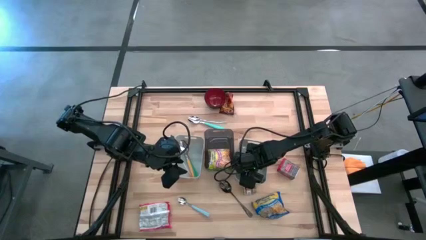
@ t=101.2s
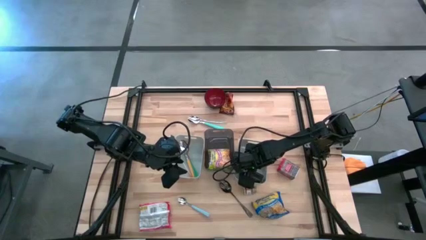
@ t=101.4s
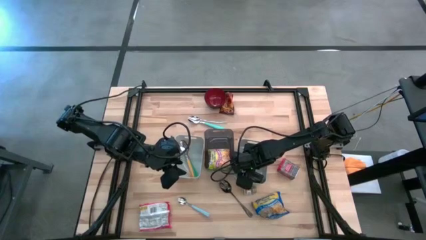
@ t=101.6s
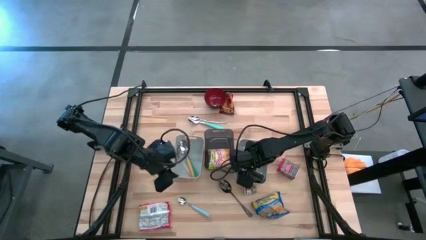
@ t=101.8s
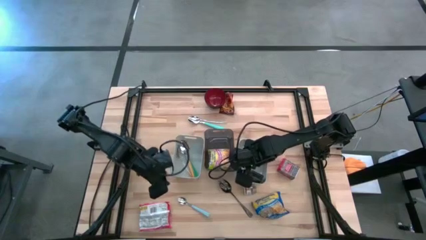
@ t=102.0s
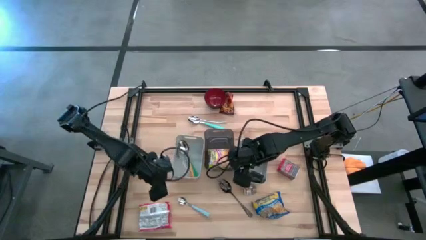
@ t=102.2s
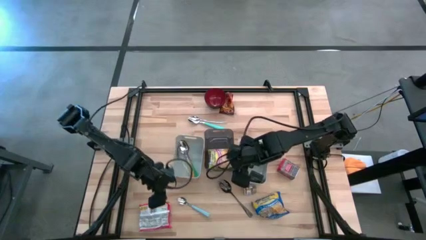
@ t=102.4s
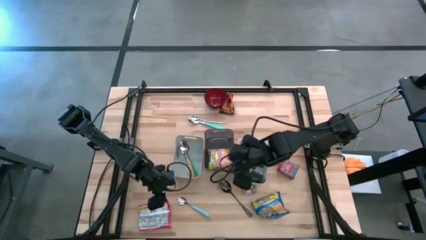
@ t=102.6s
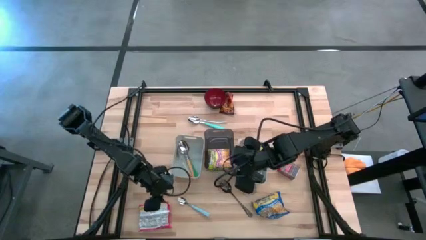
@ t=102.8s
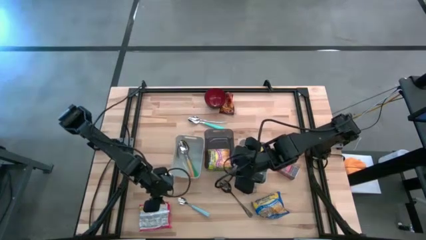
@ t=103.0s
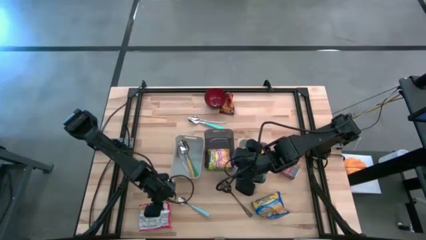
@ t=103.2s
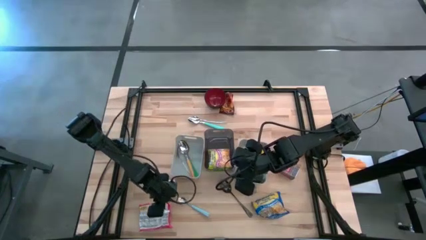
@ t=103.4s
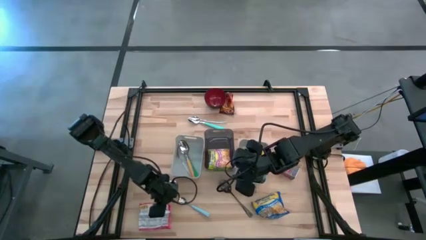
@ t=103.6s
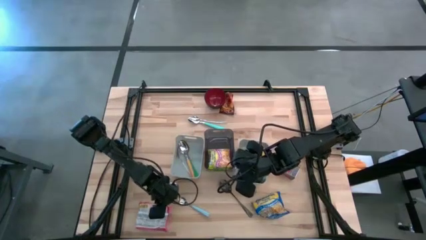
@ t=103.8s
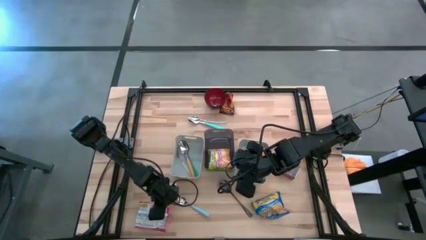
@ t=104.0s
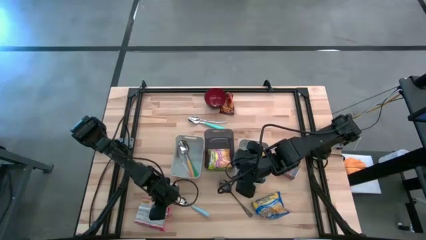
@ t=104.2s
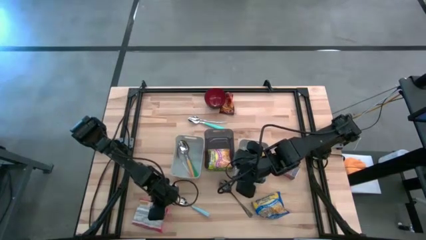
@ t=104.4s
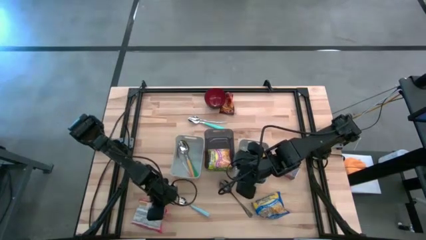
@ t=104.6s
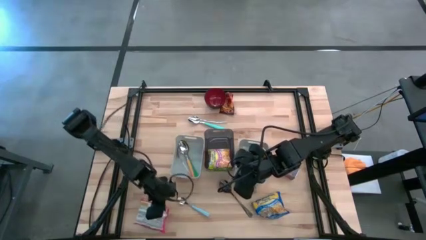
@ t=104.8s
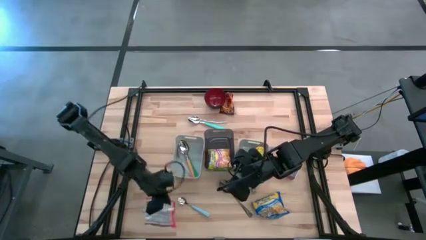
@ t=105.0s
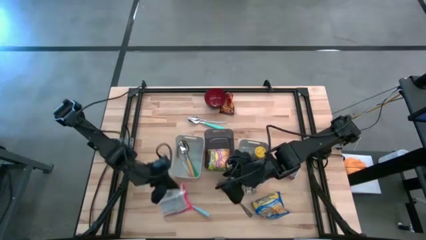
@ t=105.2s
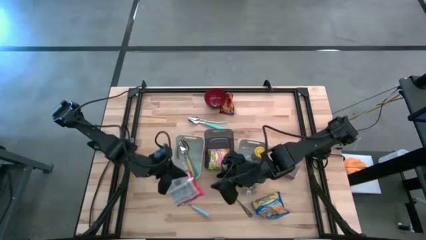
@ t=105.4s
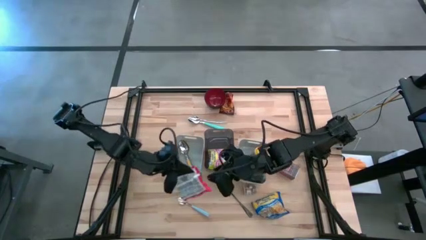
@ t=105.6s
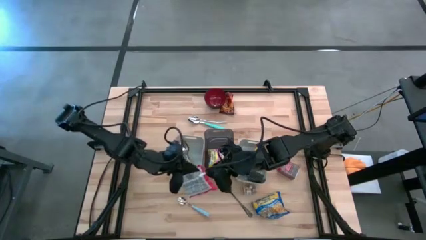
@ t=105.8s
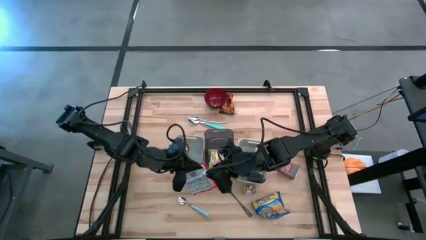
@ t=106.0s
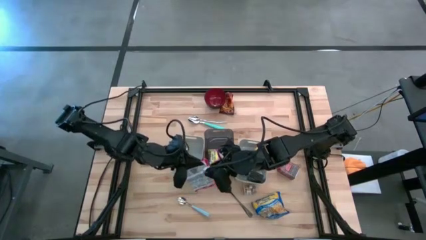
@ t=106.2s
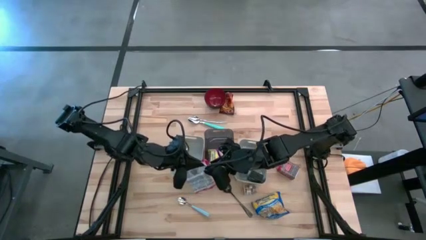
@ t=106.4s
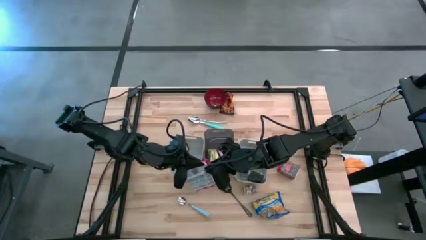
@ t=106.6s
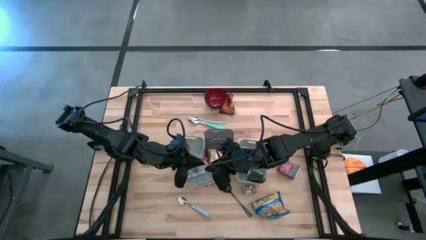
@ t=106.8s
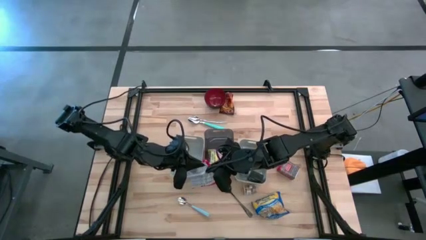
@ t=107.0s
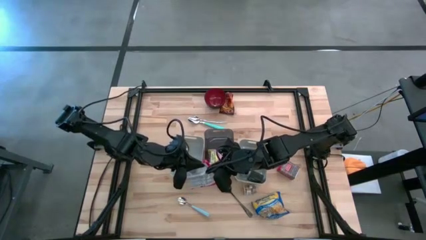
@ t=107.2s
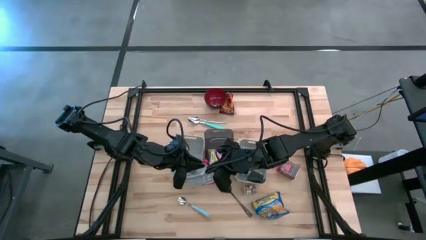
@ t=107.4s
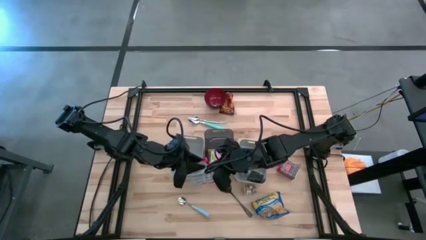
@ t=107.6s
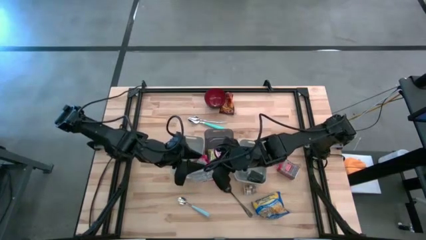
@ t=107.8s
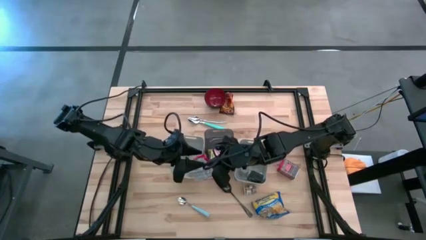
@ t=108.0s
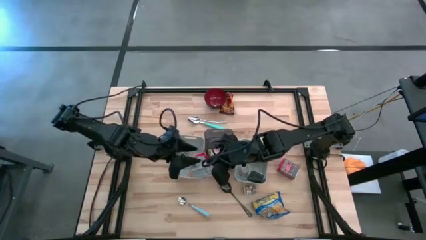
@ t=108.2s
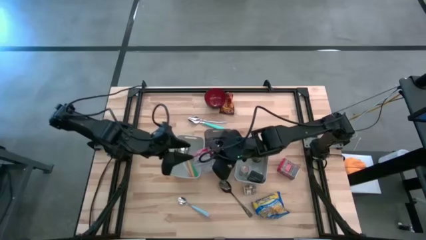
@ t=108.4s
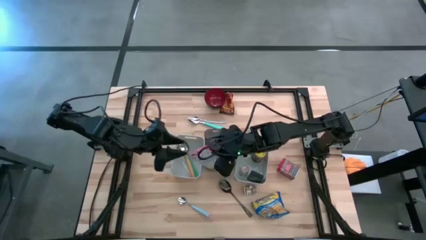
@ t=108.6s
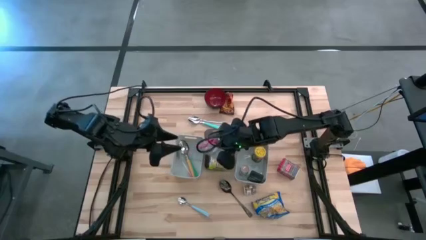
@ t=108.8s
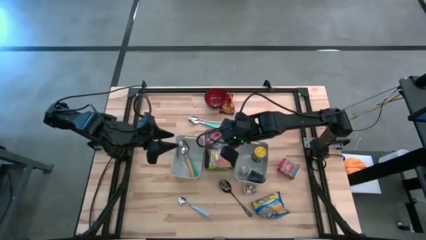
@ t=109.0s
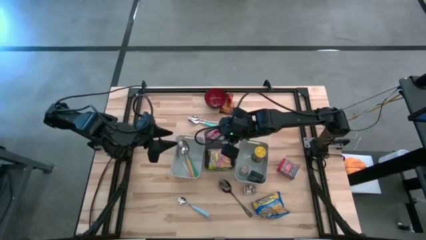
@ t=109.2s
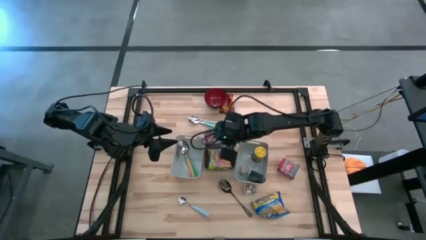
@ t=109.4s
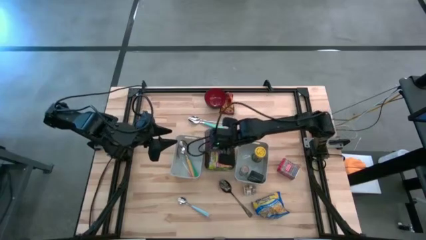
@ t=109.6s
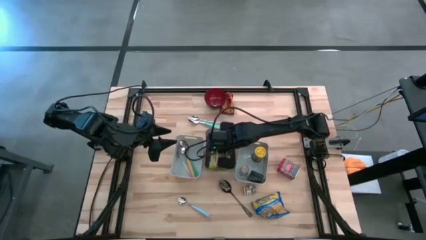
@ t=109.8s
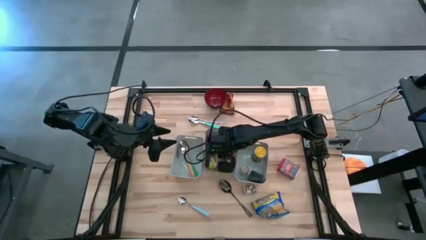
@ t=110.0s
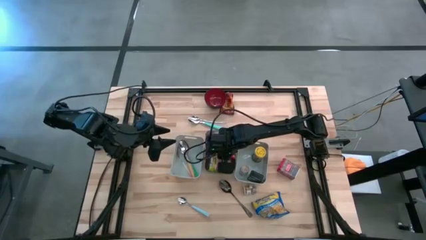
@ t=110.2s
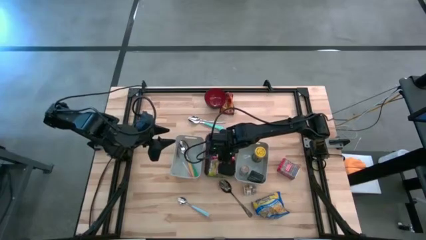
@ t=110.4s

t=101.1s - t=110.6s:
Put the red noodle pack into the black bin

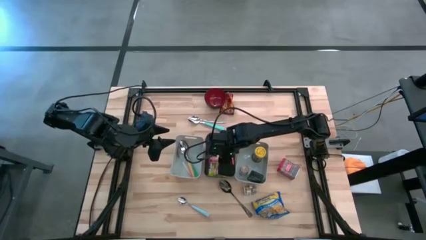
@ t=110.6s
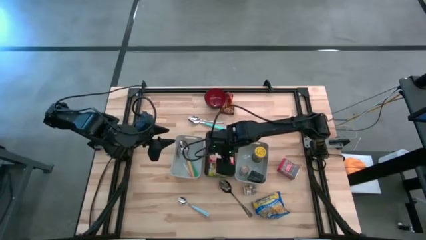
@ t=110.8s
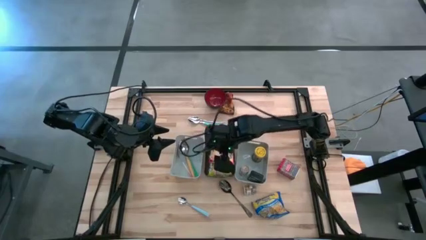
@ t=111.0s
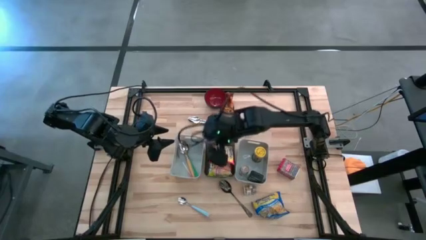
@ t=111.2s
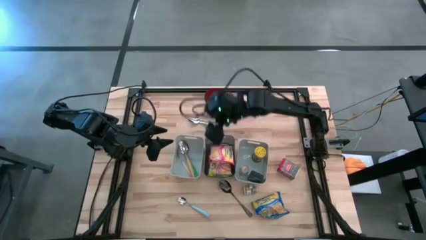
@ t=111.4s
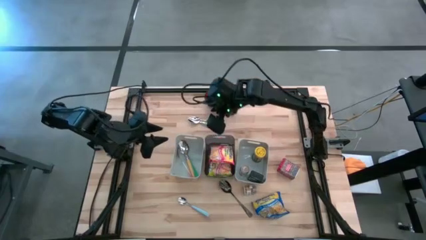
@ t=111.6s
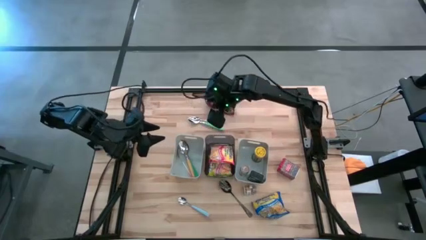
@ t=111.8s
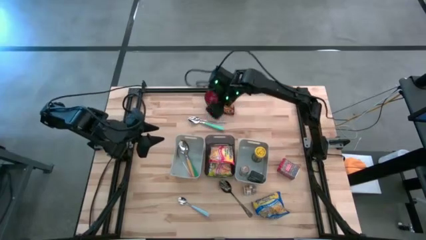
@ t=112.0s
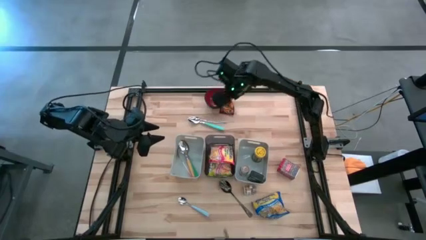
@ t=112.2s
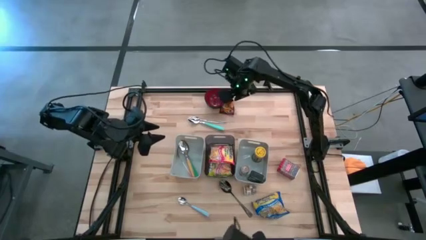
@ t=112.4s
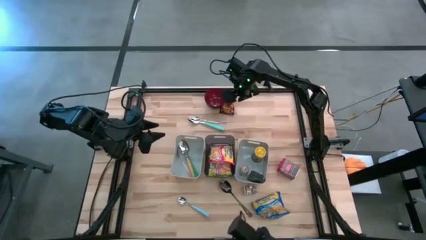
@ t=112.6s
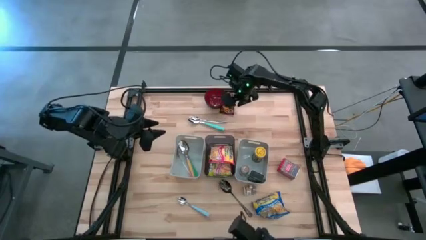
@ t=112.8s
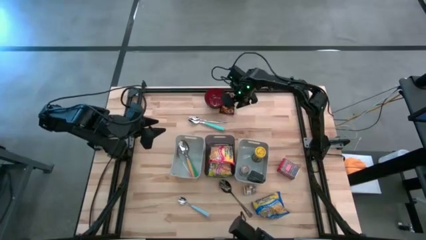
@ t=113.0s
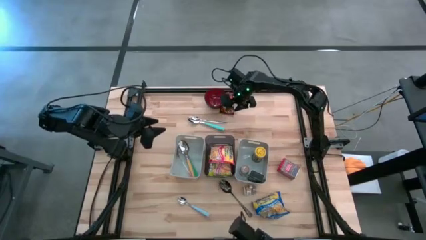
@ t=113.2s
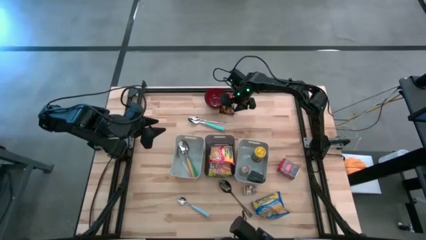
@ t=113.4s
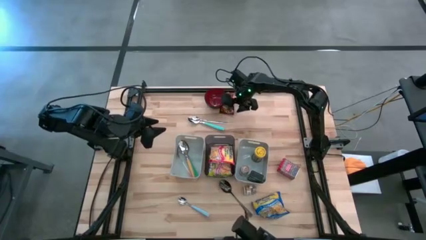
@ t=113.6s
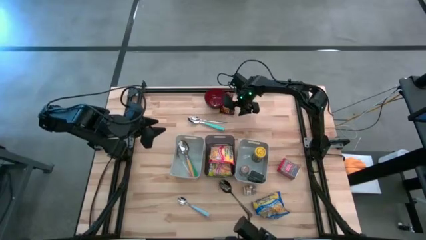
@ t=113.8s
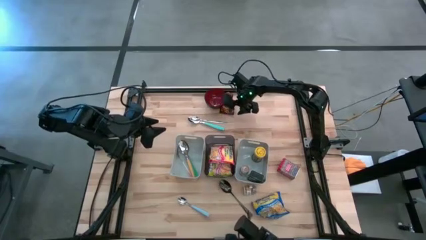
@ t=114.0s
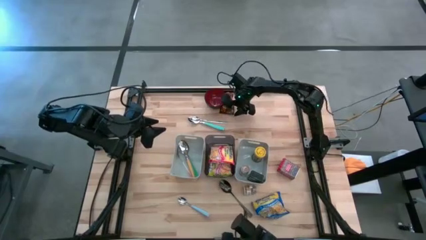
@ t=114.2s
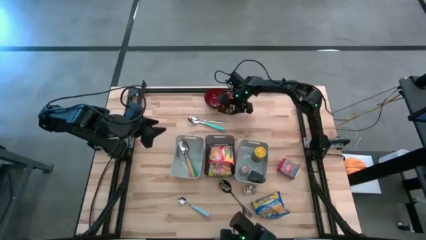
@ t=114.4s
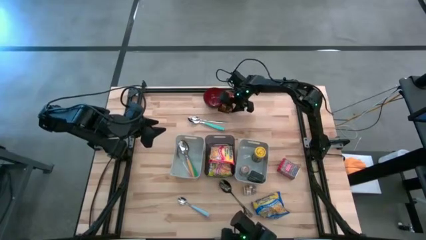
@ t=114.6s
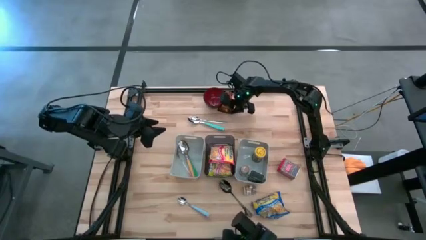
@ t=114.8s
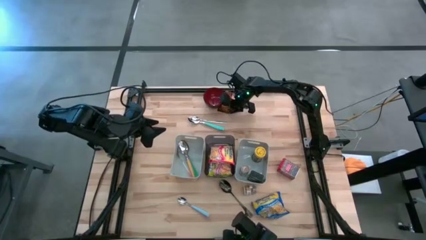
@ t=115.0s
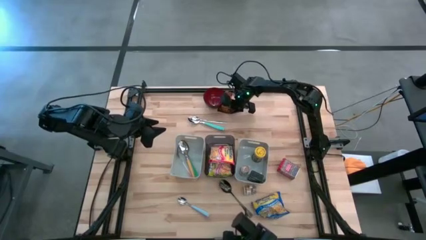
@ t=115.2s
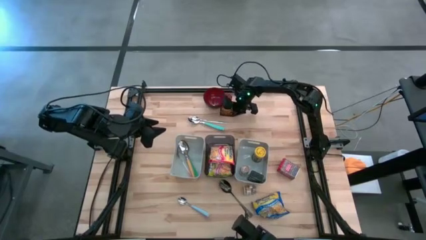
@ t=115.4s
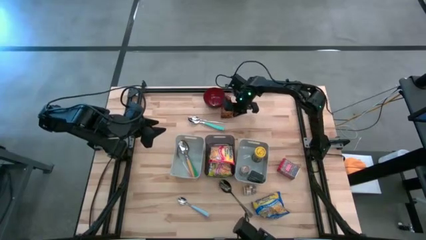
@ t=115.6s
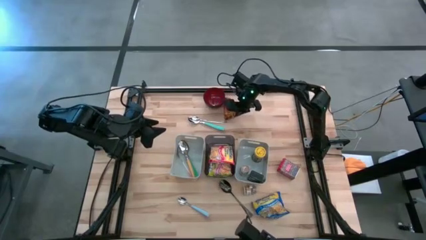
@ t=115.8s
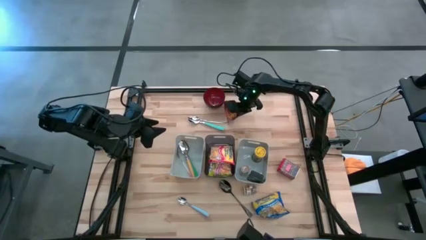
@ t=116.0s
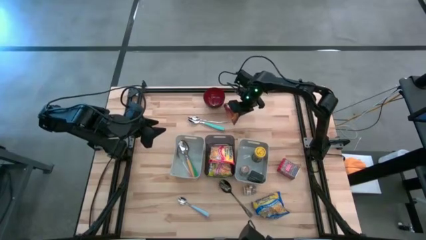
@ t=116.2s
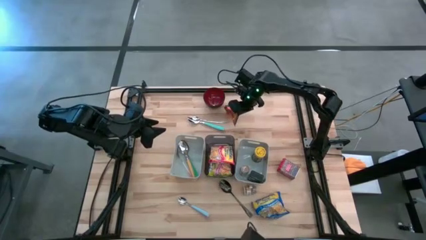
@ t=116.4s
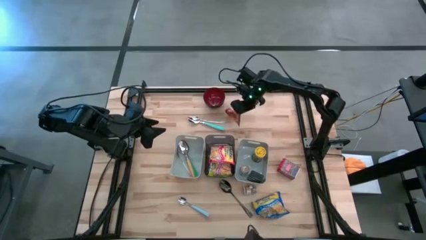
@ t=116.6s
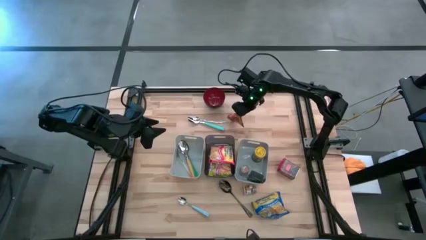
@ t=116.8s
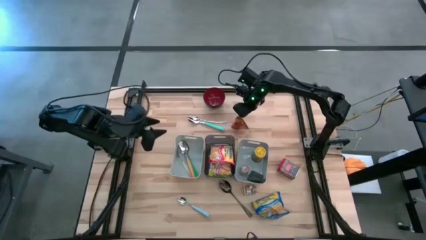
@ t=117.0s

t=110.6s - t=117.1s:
Put the orange seasoning pack into the right gray bin
